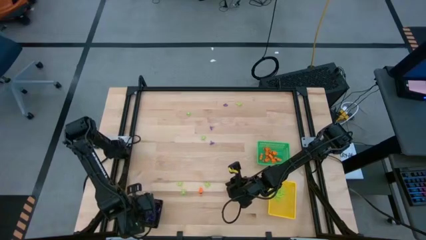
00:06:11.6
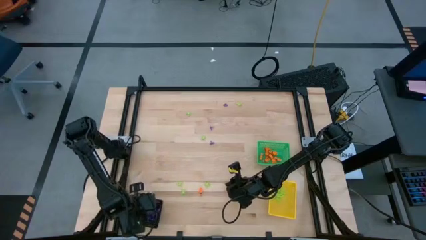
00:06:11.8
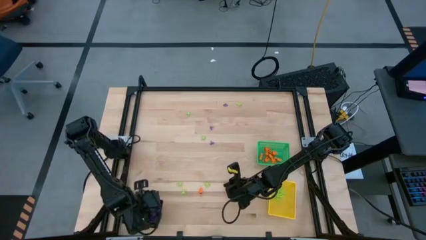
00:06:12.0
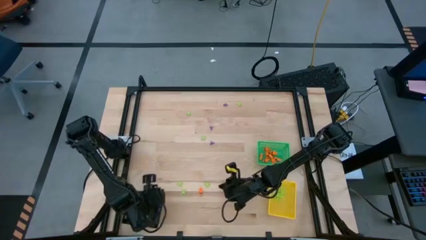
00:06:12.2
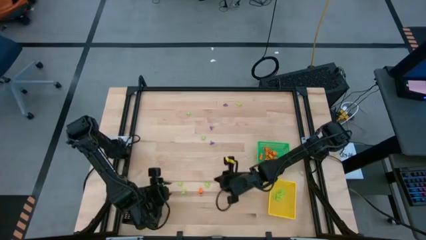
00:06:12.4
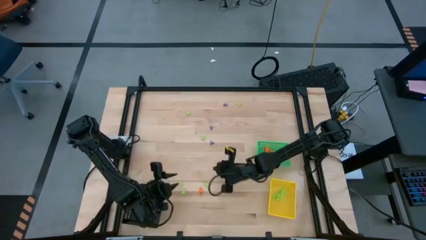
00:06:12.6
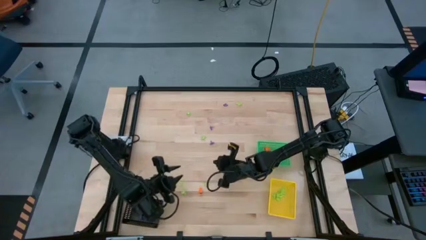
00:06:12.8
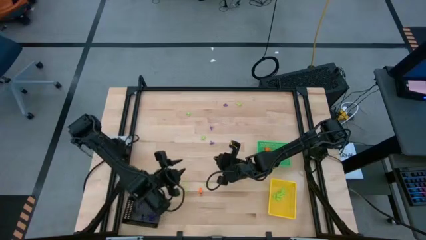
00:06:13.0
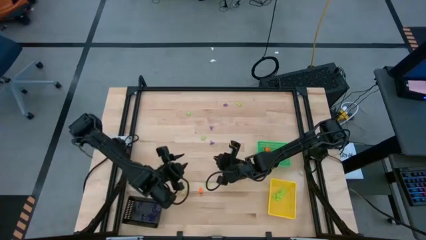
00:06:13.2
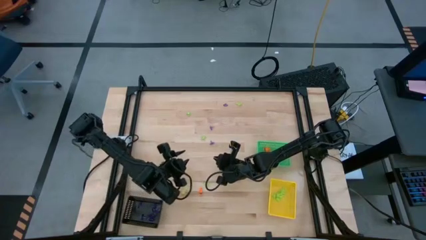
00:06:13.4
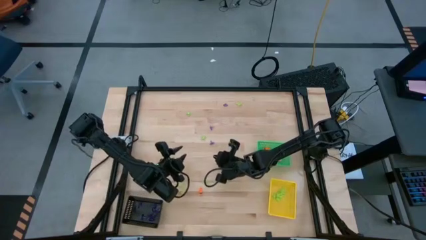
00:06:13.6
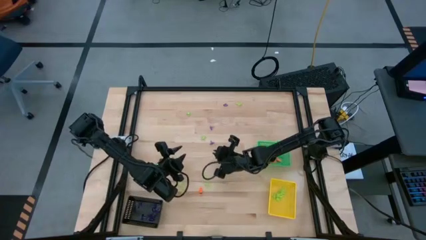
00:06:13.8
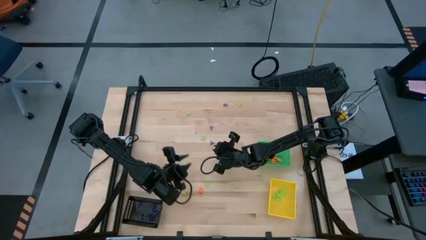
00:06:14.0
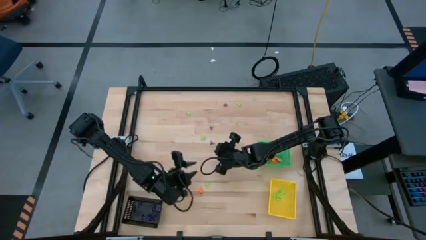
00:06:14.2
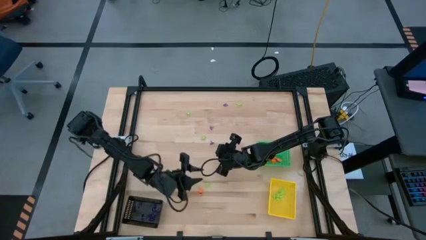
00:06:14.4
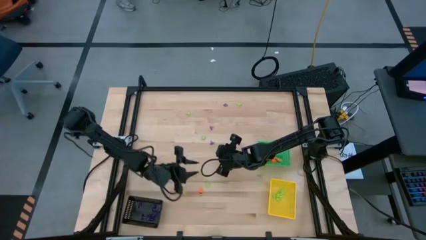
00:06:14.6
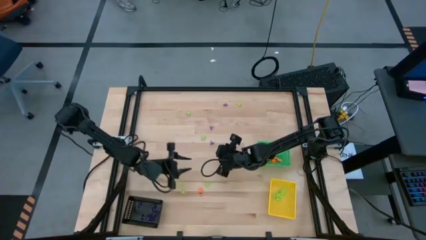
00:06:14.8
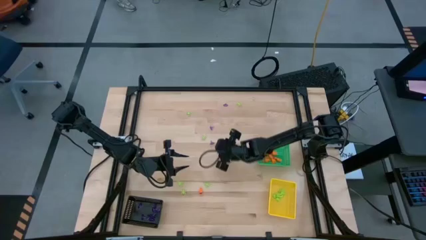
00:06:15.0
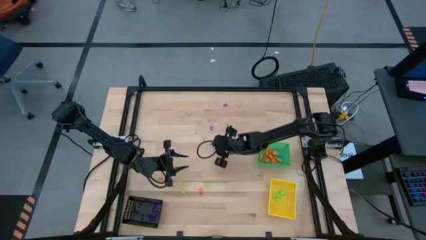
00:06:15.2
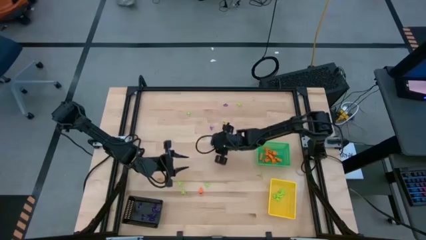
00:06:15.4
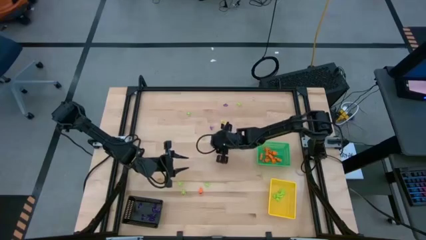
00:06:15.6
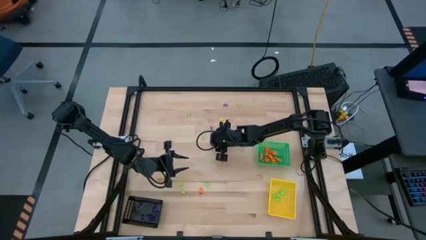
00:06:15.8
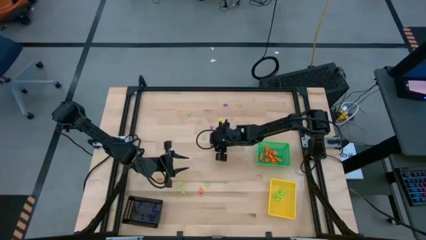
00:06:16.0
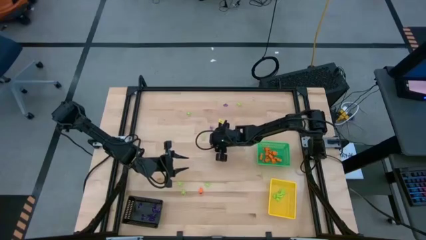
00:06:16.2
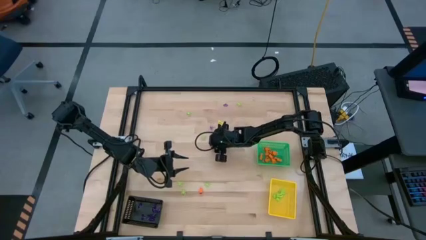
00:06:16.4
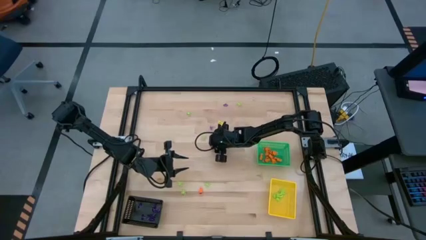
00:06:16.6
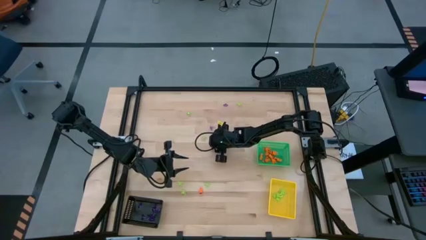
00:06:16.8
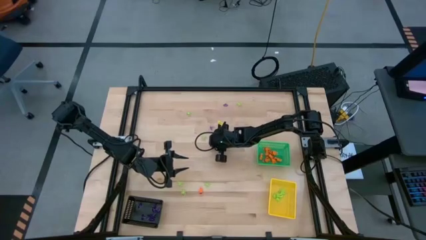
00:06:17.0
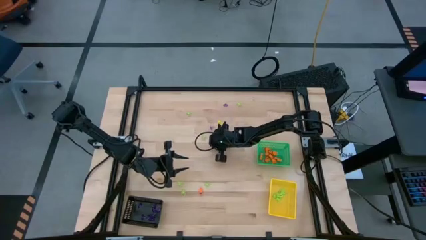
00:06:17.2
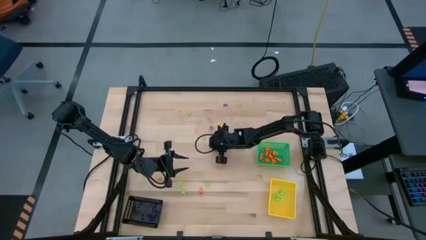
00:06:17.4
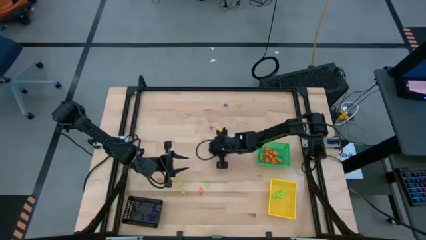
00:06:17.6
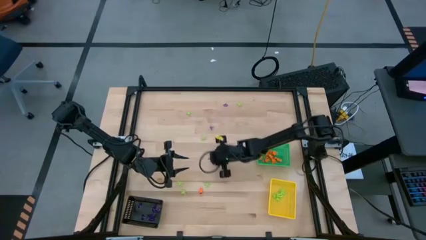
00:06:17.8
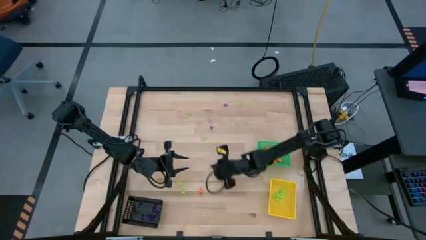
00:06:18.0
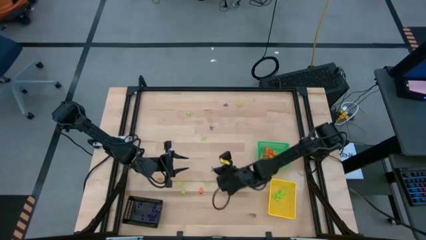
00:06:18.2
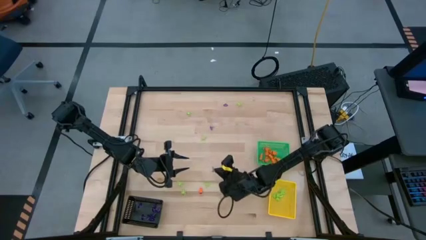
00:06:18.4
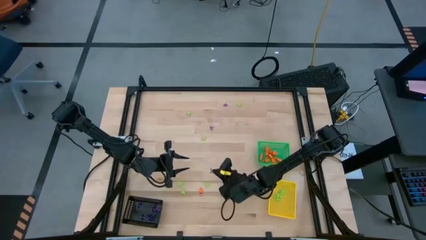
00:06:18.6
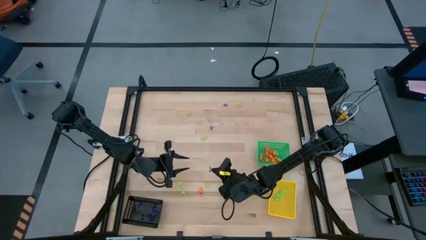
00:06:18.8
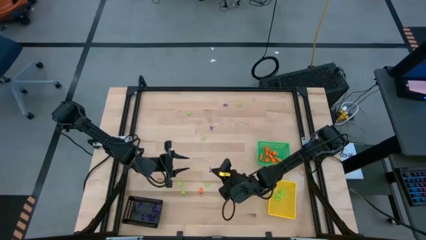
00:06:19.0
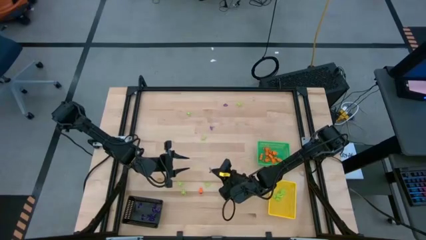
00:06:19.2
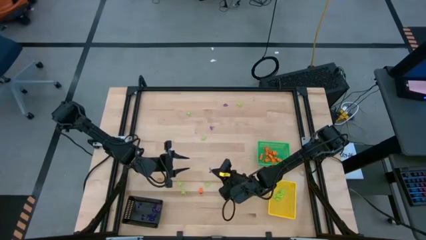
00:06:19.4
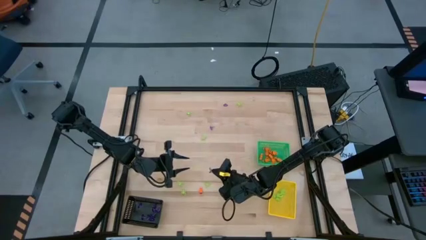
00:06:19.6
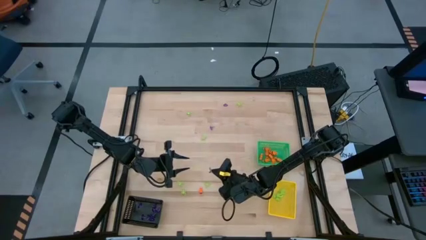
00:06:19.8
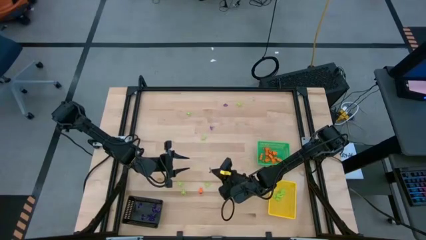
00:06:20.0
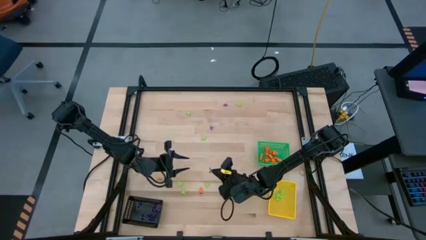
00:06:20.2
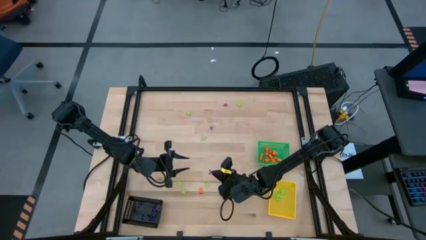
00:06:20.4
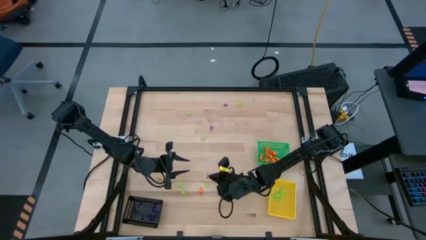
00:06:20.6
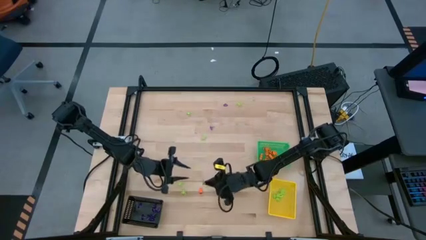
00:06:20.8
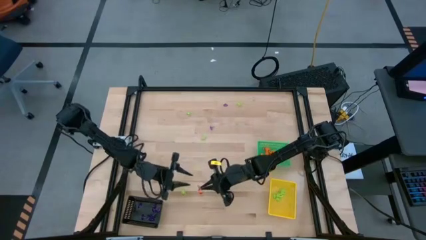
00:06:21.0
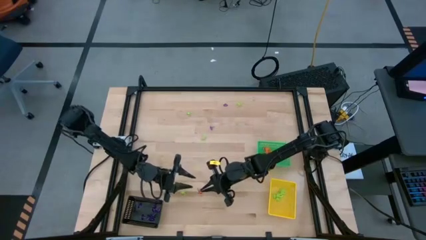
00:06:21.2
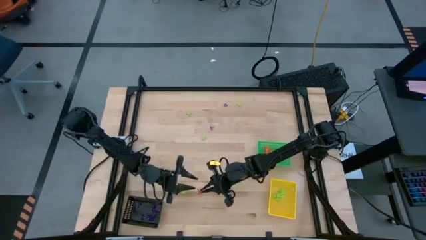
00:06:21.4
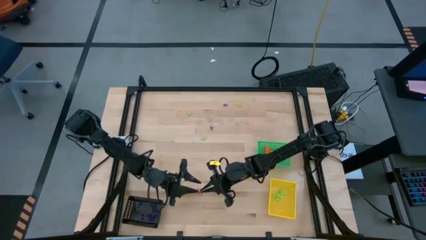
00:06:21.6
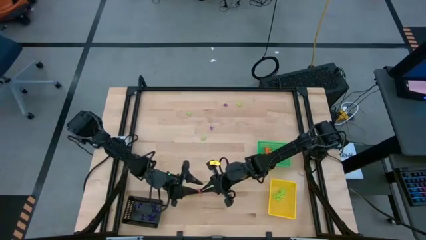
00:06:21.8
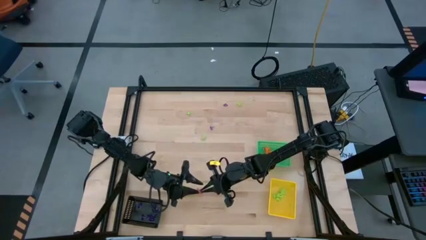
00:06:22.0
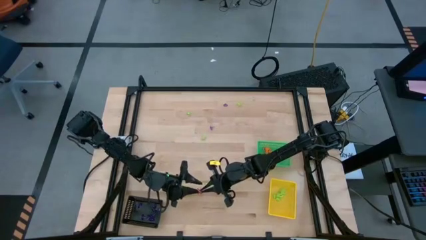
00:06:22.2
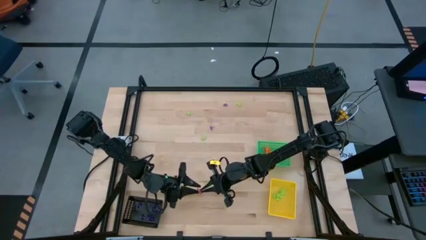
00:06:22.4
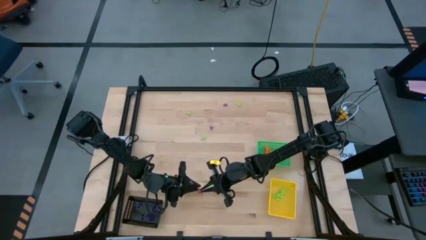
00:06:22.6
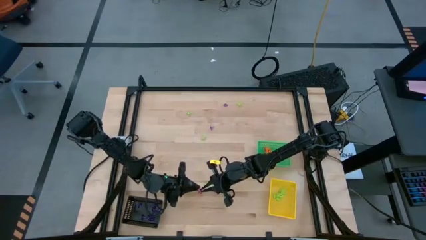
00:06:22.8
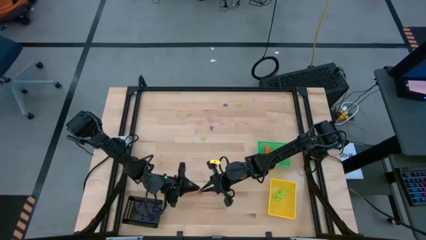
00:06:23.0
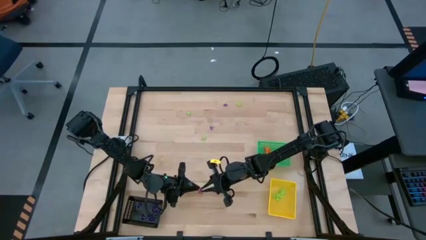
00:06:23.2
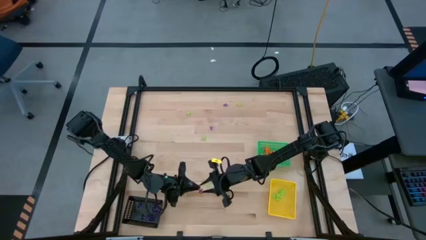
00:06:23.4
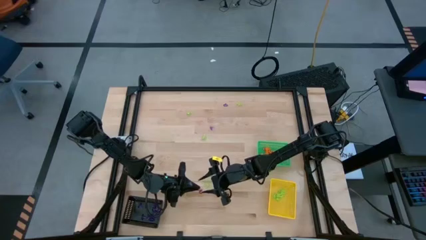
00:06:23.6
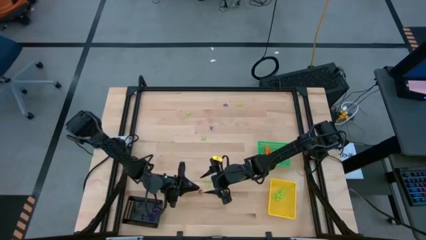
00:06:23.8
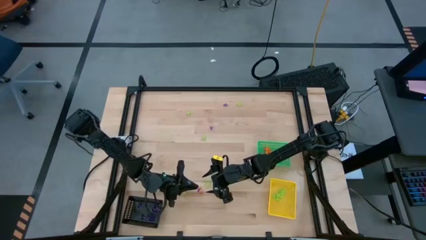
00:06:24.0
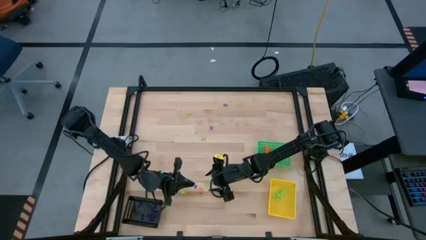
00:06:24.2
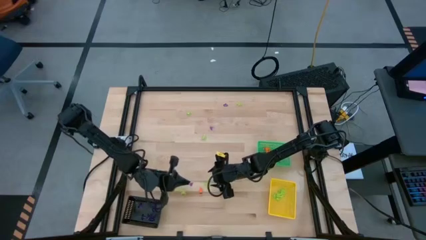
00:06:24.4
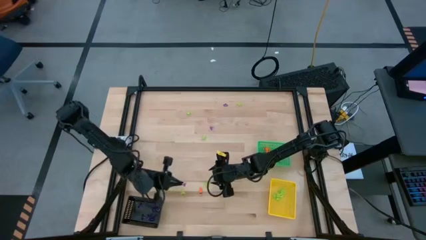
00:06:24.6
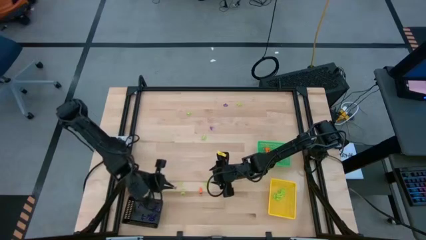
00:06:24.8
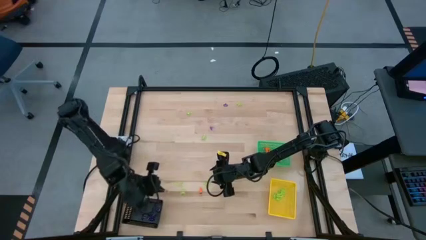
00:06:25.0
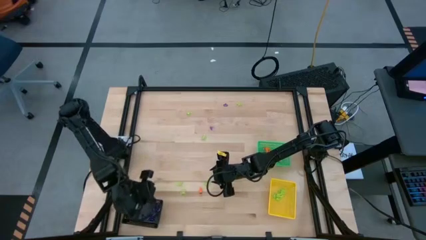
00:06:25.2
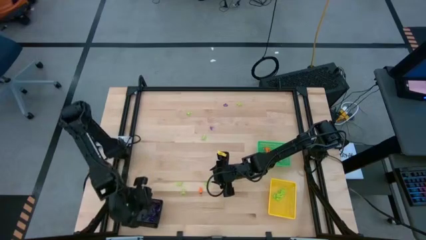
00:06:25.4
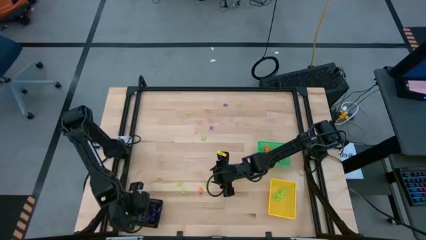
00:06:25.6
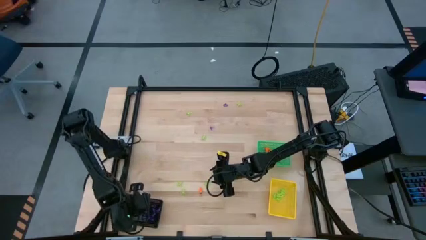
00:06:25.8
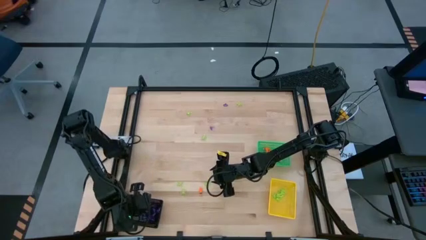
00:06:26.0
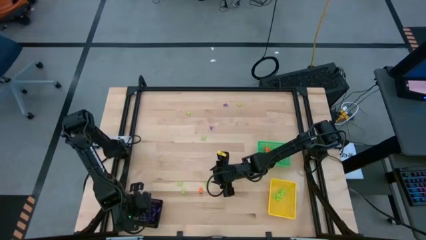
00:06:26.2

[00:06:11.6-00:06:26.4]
Task: Sort Halloween decoration
Put the purple witch hat toy into the black bin
